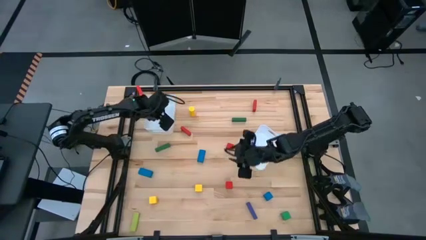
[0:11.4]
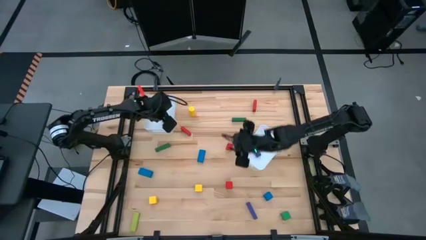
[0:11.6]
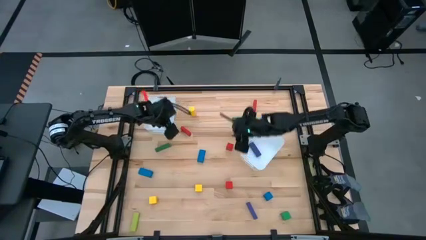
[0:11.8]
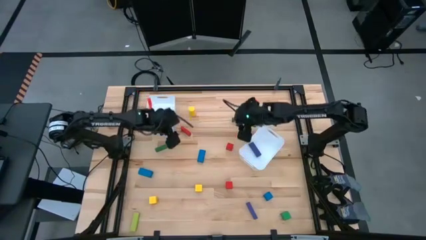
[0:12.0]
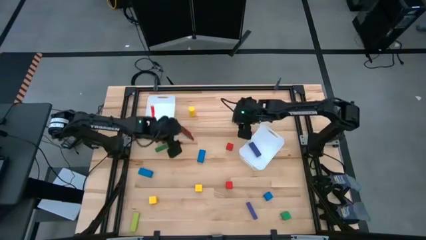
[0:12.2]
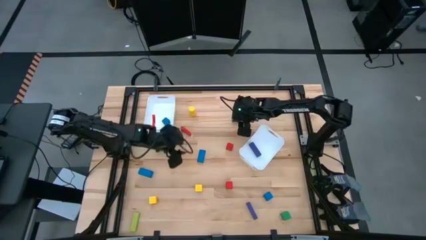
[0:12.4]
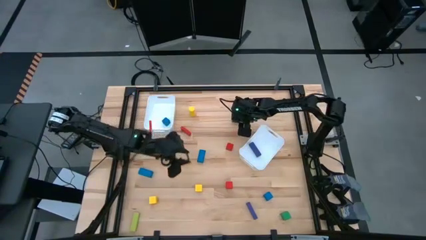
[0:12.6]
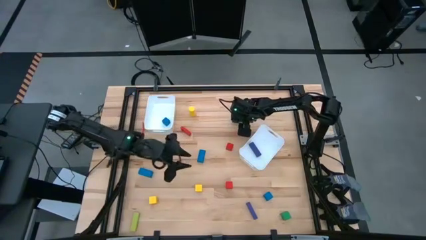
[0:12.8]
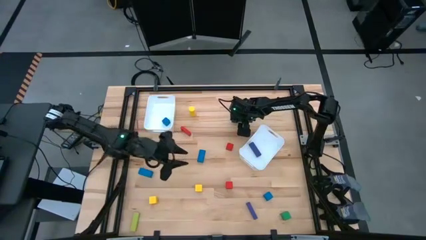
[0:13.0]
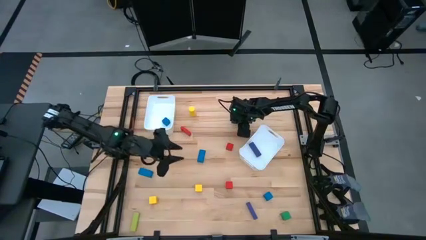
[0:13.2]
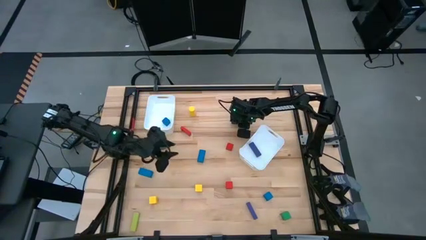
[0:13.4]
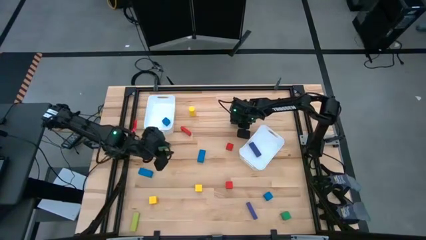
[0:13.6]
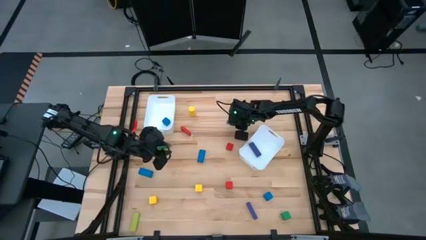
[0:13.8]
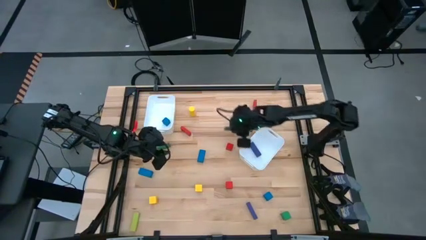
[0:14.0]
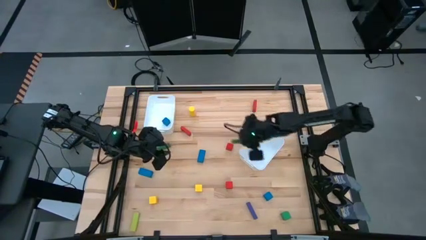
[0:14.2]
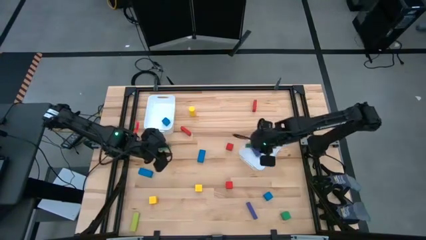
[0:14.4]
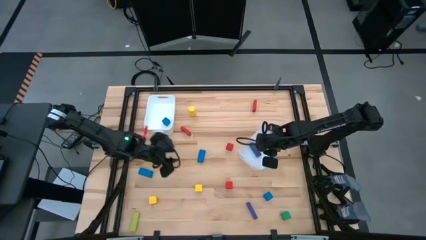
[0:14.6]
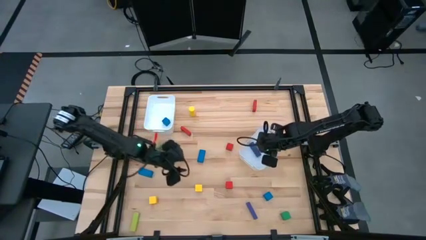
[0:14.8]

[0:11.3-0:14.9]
Task: Sort blocks by size
Put the right green rectangle block into the right white bin

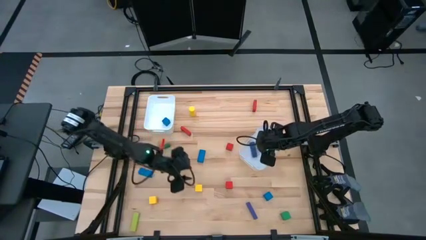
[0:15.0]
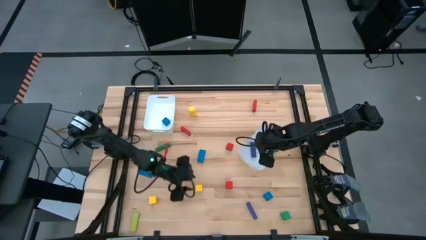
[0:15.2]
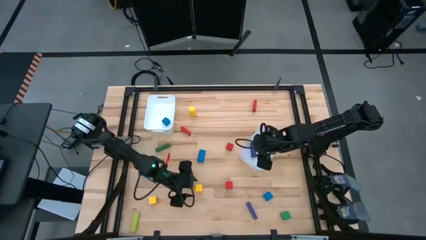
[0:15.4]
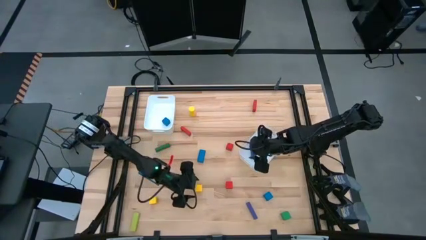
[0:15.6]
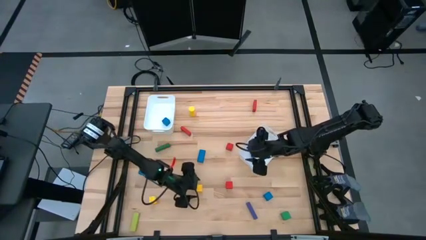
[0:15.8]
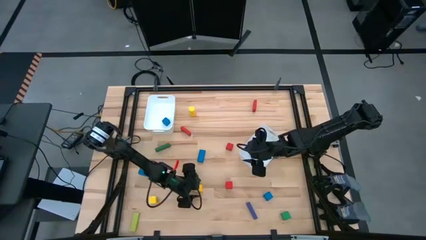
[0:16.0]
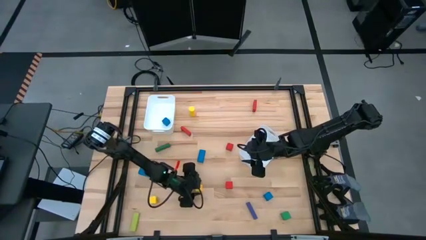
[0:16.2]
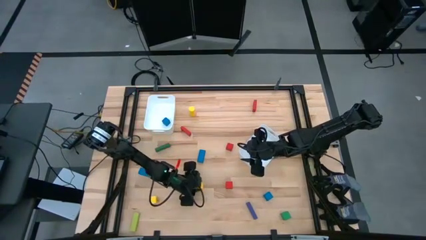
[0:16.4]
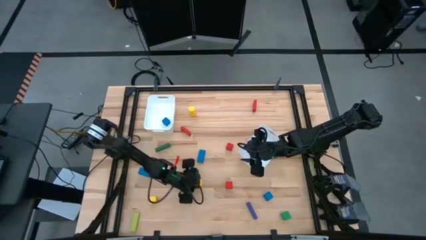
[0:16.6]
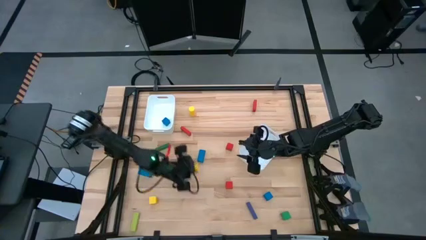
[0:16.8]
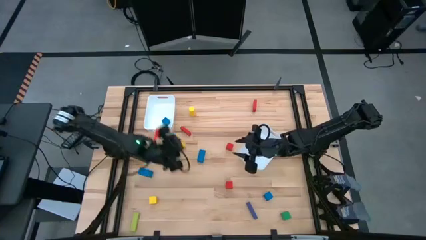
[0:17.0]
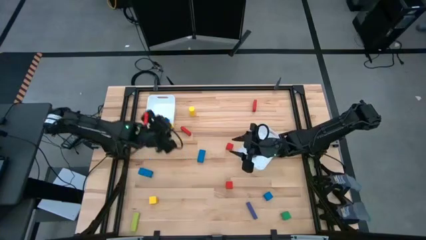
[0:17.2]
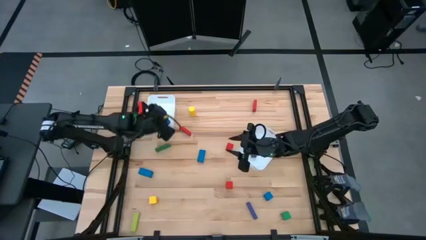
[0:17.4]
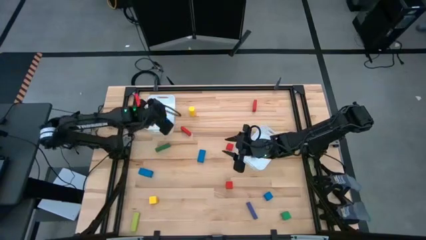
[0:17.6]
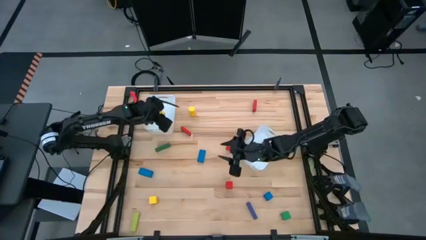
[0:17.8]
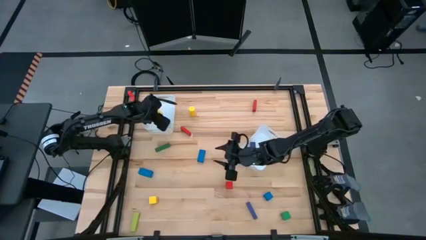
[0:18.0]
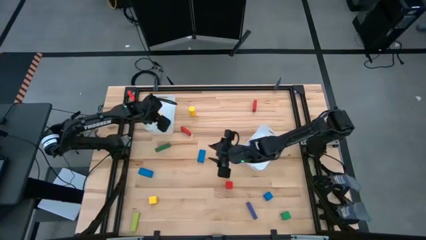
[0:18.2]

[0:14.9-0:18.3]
Put the right yellow square block into the left white bin

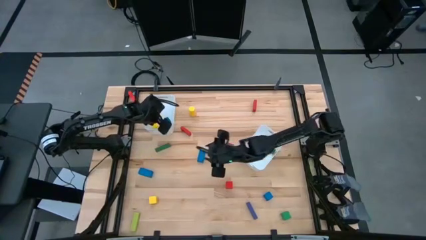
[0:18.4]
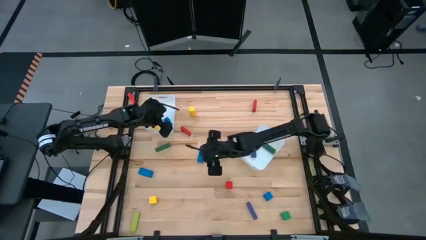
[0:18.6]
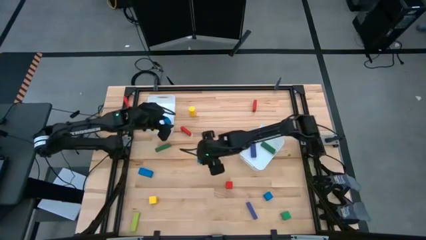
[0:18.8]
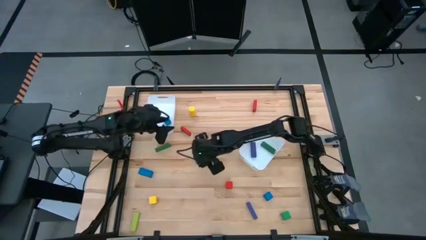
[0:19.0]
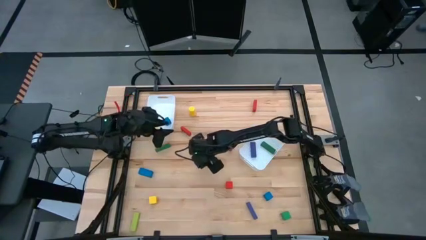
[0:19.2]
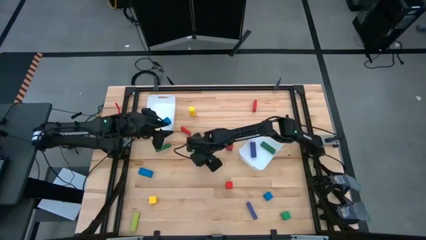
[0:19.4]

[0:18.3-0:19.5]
Put the right blue rectangle block into the right white bin

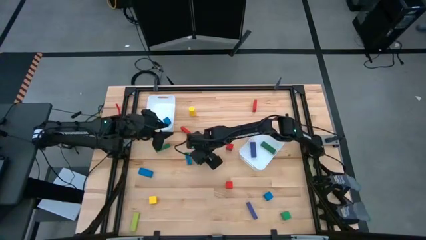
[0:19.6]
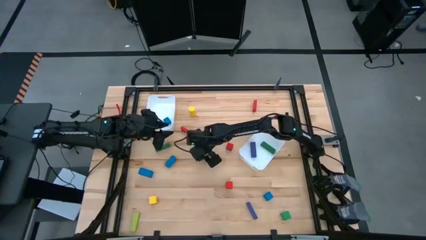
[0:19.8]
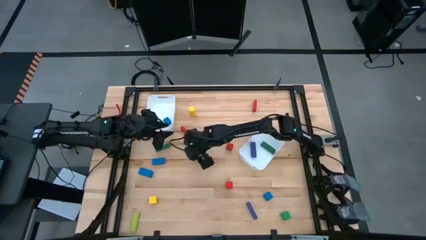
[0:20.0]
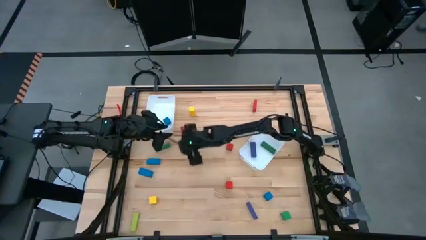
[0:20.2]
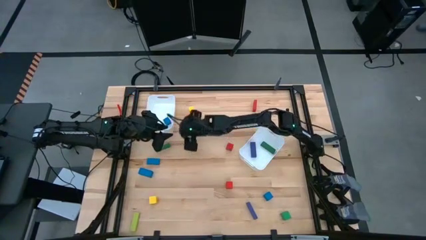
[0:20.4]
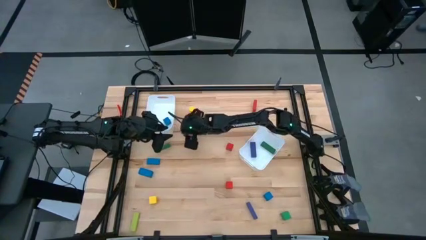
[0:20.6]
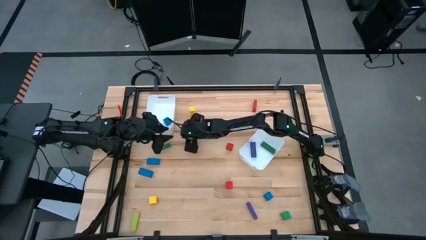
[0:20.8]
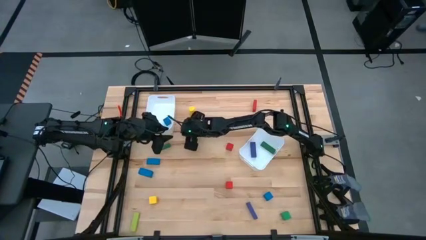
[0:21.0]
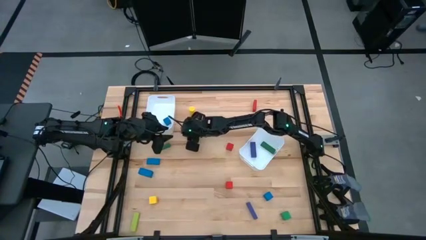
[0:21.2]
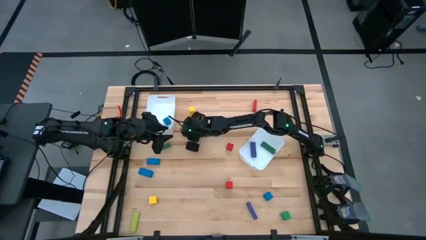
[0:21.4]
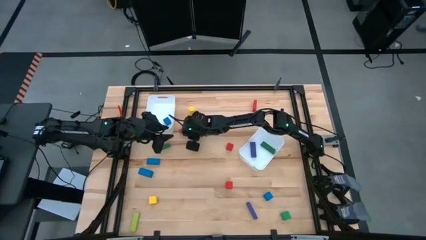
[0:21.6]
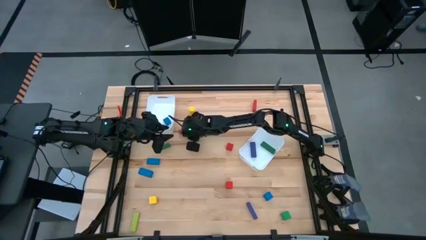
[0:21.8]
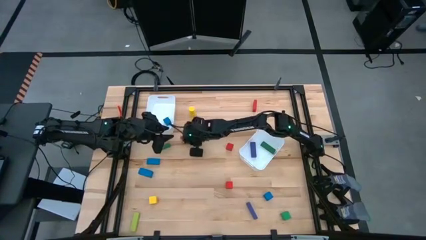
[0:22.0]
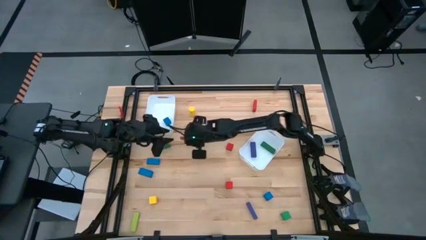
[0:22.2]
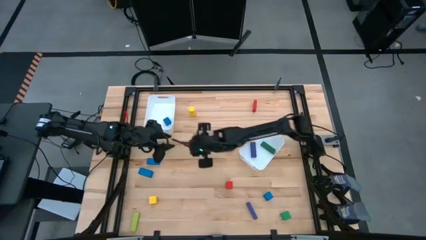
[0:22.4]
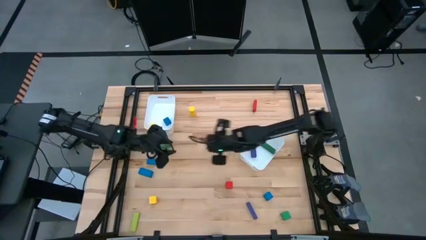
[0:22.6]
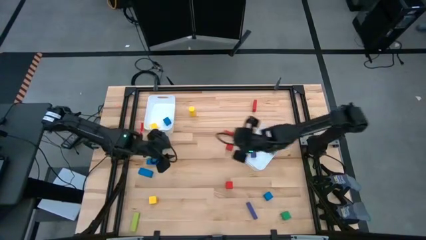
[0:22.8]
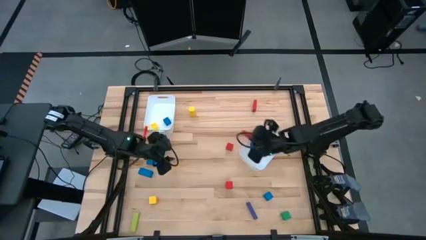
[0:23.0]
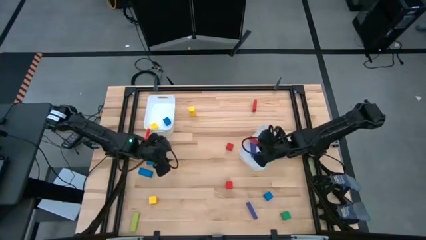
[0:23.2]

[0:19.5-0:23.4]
Put the left red rectangle block into the right white bin

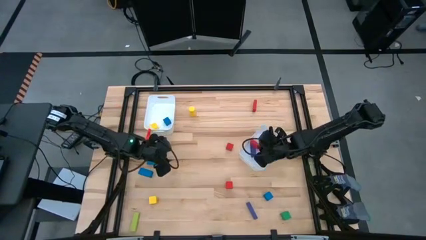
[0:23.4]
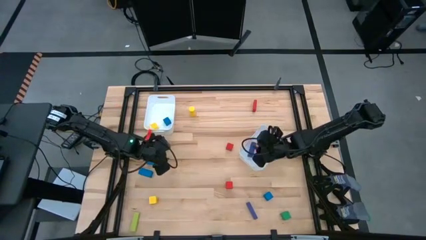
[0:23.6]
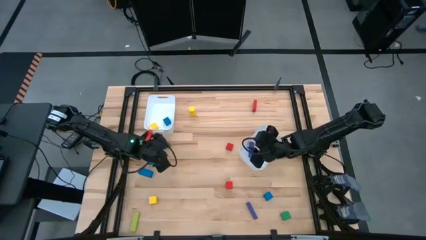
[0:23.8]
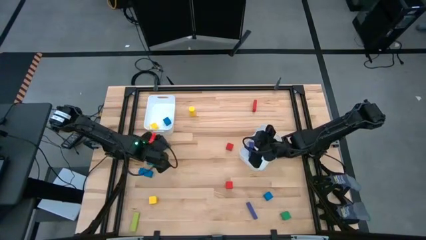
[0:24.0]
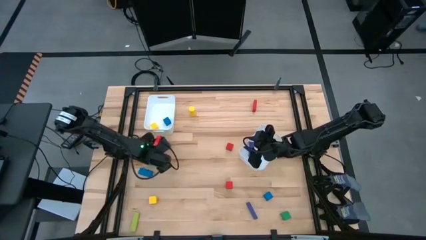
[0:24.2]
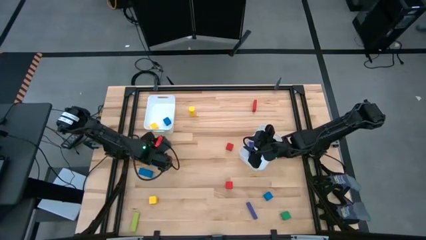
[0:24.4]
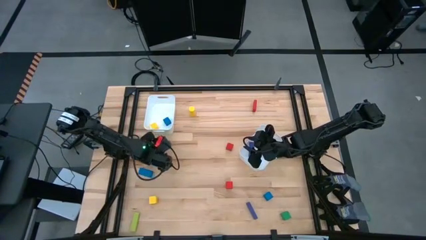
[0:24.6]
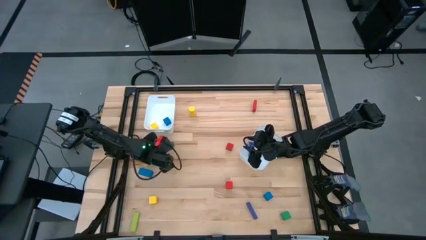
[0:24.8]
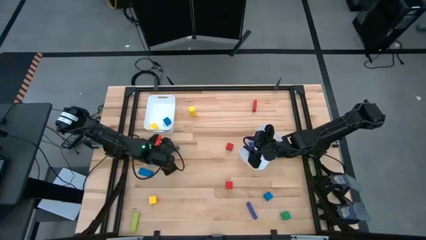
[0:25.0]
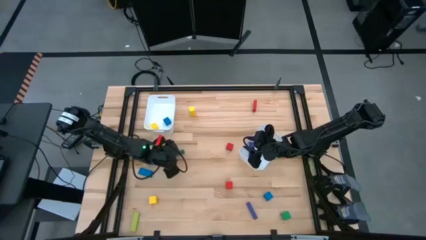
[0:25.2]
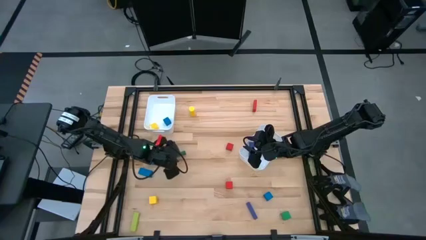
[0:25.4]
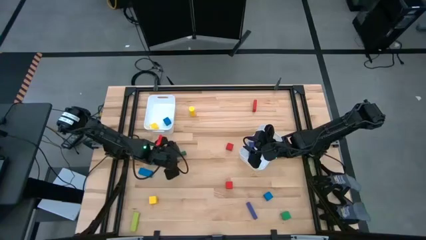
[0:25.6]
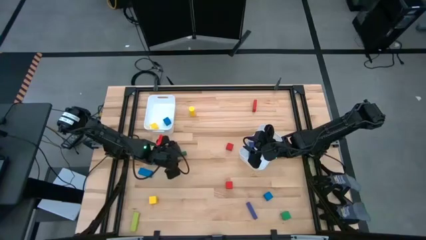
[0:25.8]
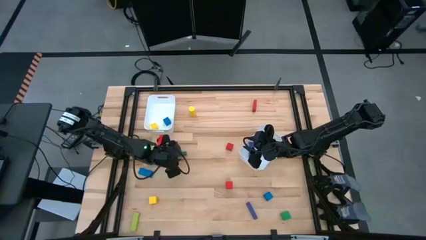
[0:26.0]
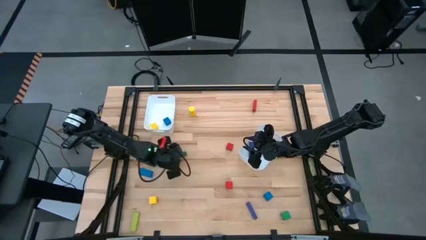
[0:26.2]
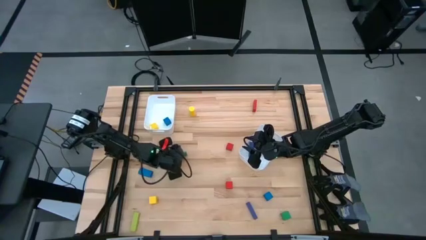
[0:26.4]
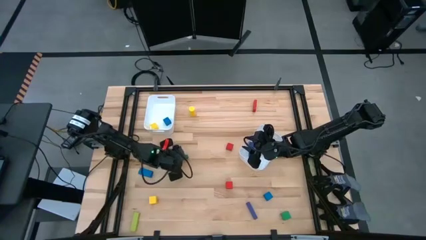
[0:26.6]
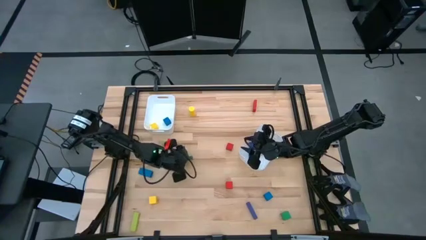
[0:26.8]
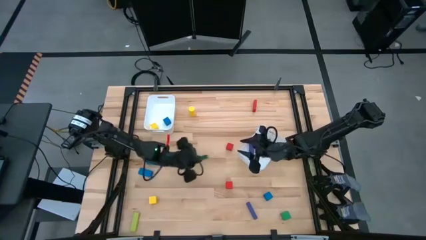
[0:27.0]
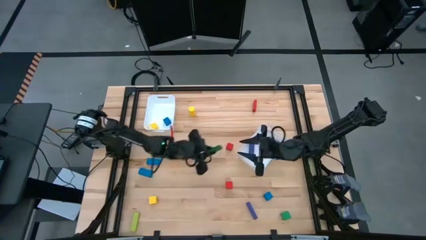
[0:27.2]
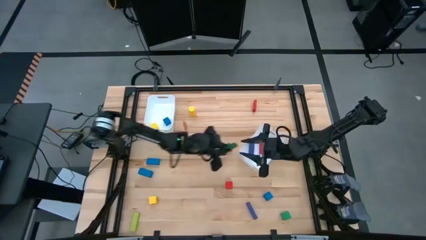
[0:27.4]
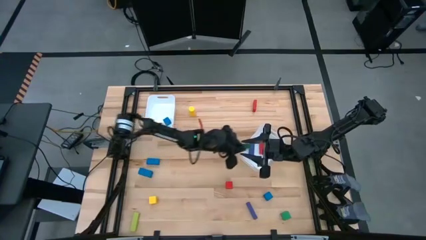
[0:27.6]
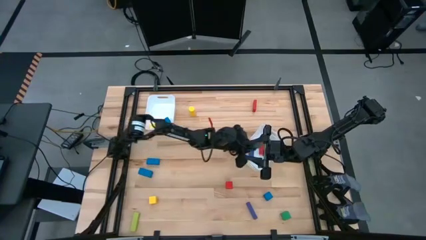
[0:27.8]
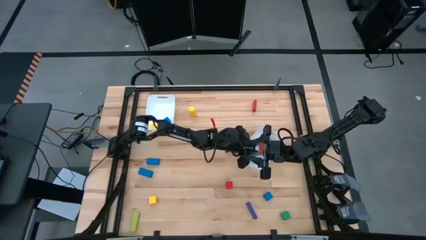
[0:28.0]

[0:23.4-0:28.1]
Put the green rectangle block into the right white bin

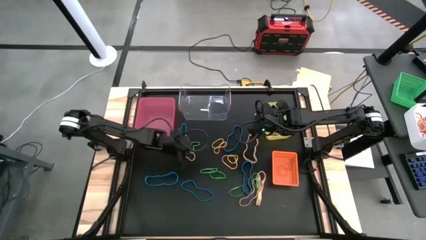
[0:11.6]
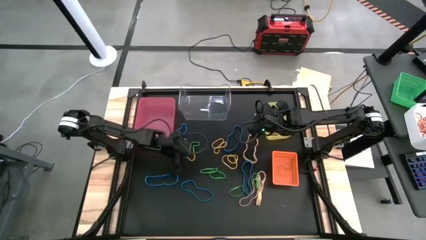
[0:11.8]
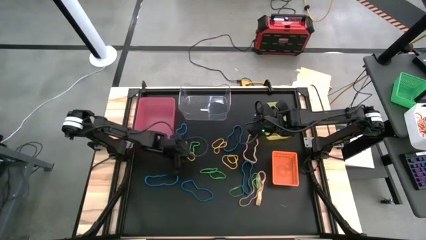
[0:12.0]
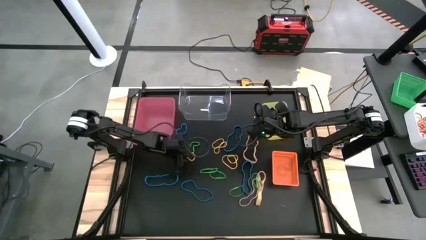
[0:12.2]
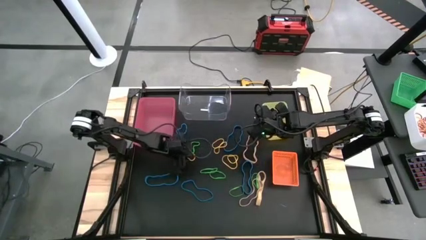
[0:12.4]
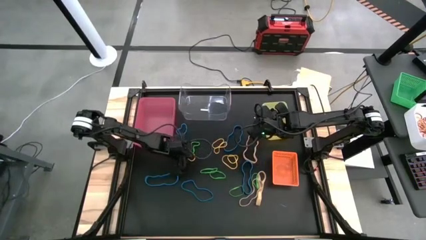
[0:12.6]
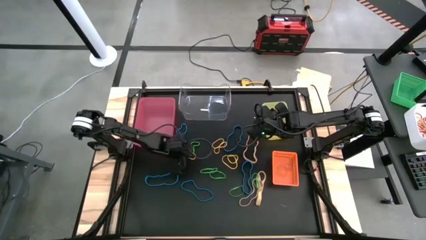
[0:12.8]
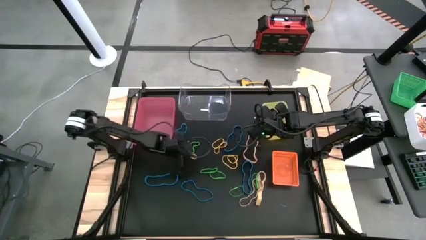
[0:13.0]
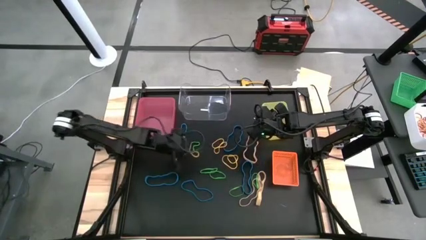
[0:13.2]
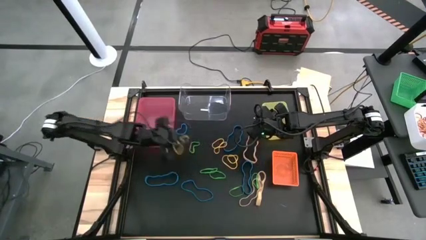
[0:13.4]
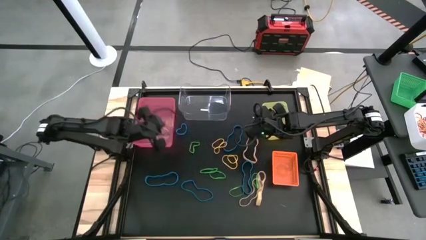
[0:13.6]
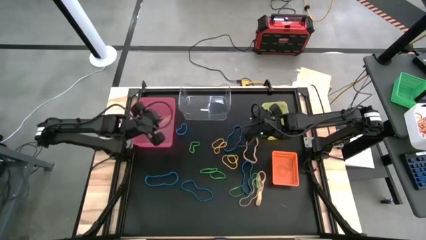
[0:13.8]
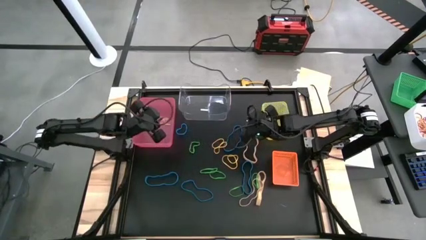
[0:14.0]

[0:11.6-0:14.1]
Task: Sort rubber bands into baskets
Put the yellow rubber band into the pink bin
